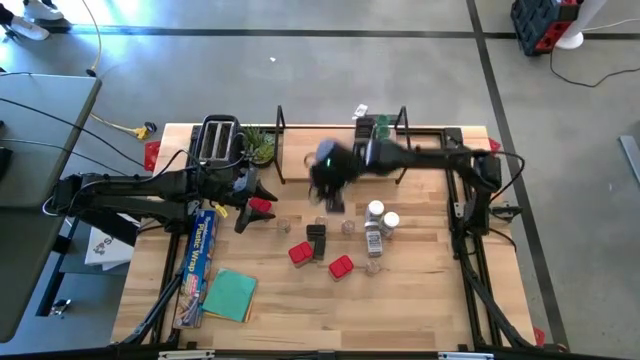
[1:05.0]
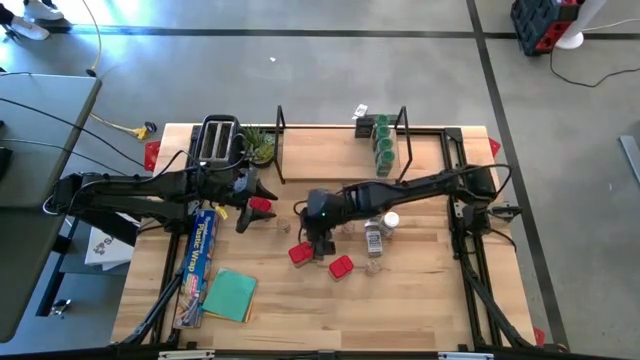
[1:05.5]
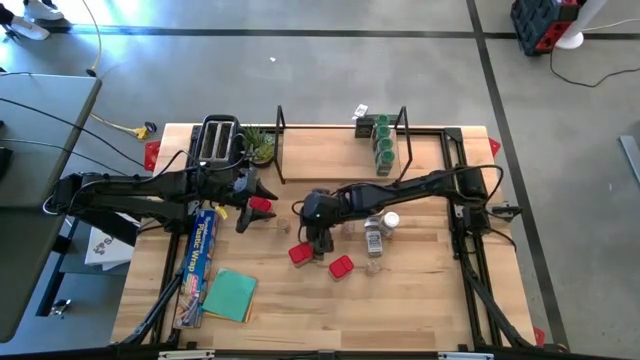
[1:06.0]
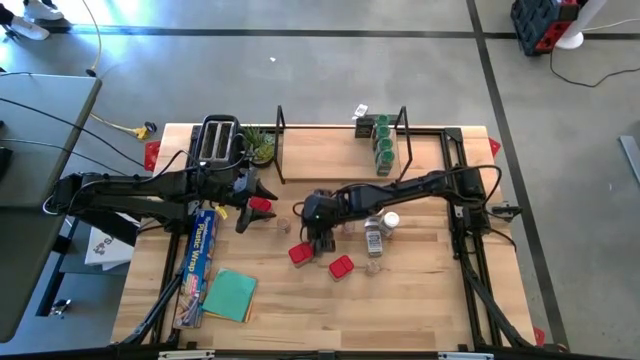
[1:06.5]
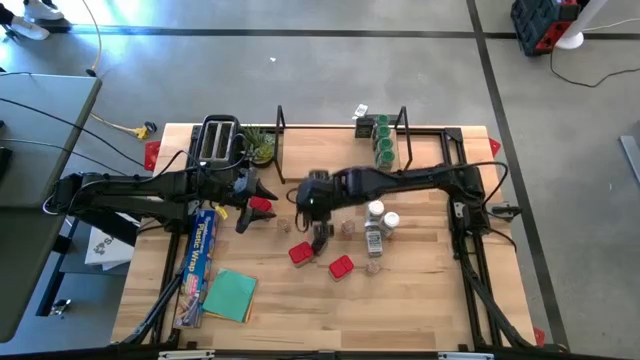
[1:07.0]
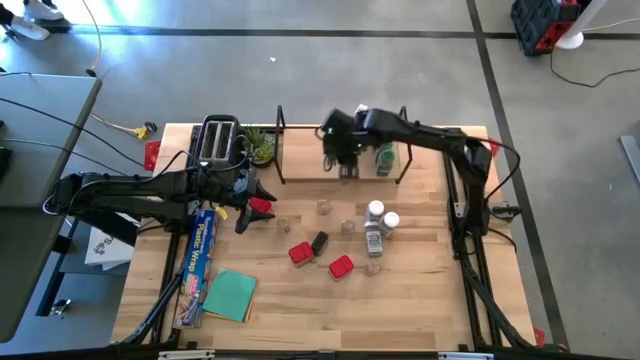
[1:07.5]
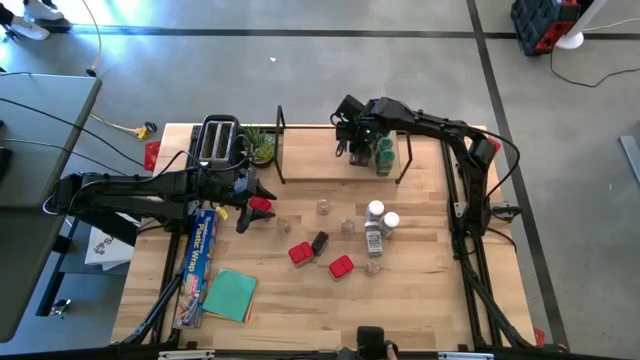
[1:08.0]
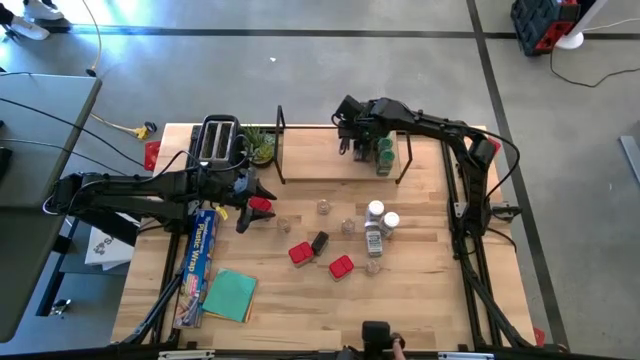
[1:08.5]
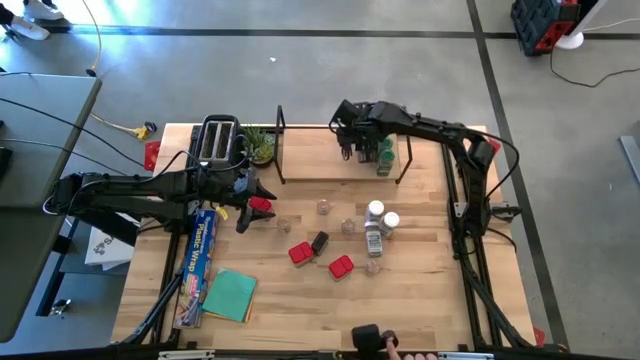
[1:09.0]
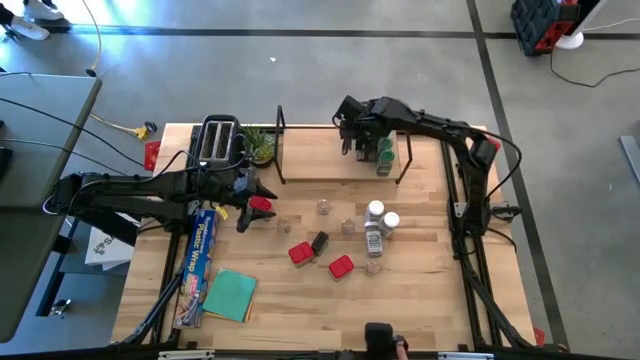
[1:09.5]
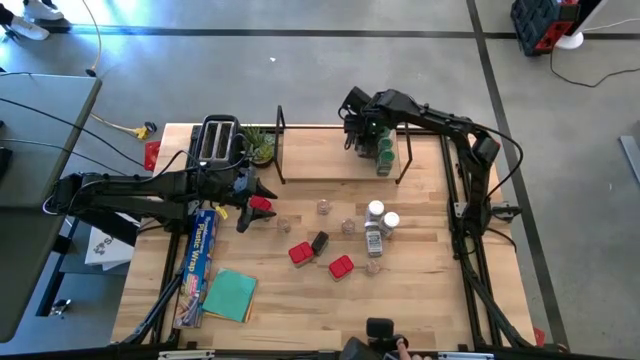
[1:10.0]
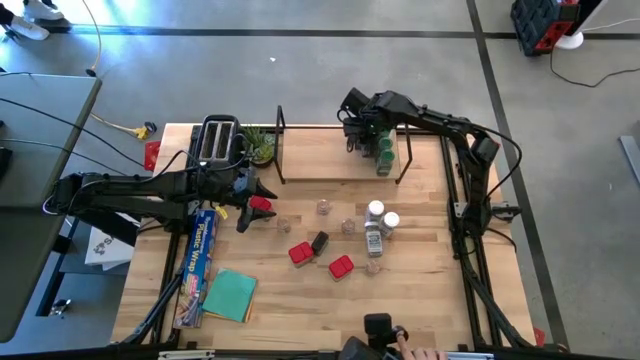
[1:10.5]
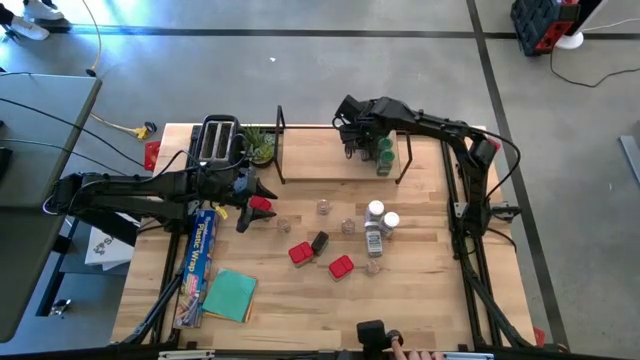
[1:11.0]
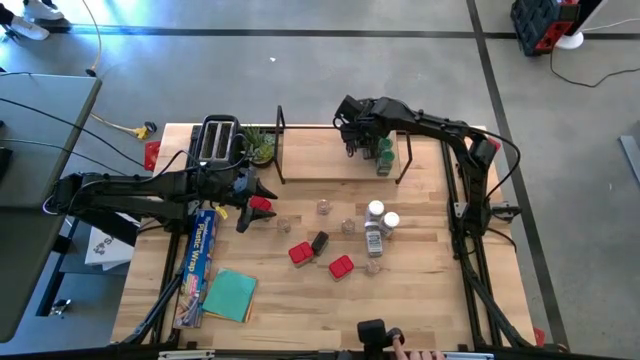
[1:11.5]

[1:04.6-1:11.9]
Task: Shelf spices
Put the top black seasoning can on the shelf aligned with the other black seasoning can

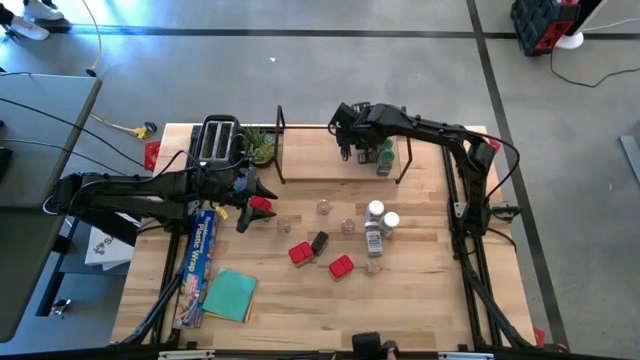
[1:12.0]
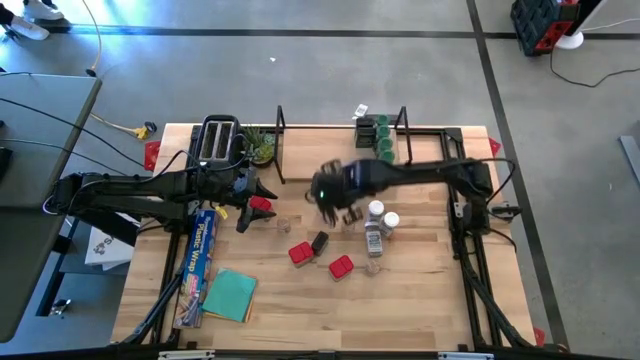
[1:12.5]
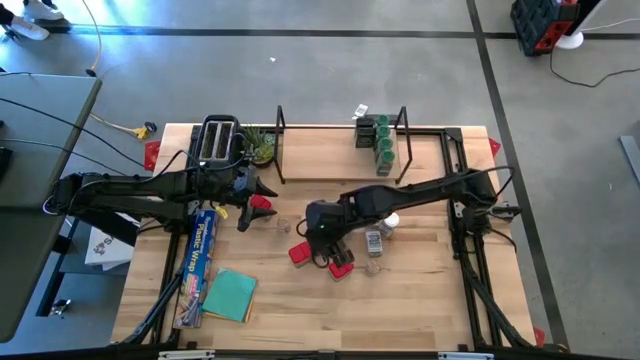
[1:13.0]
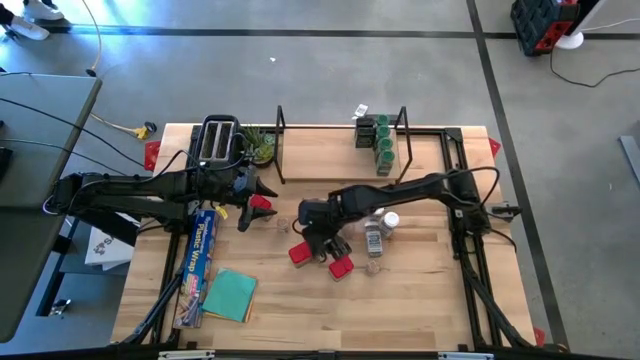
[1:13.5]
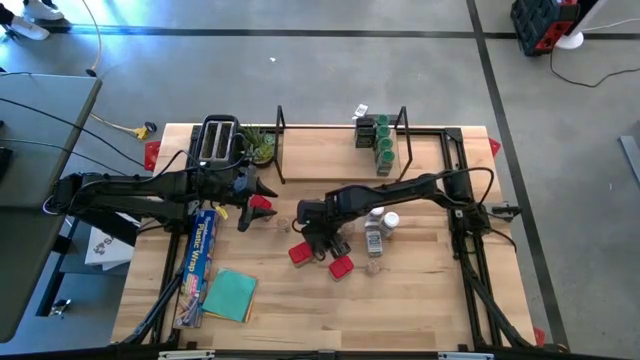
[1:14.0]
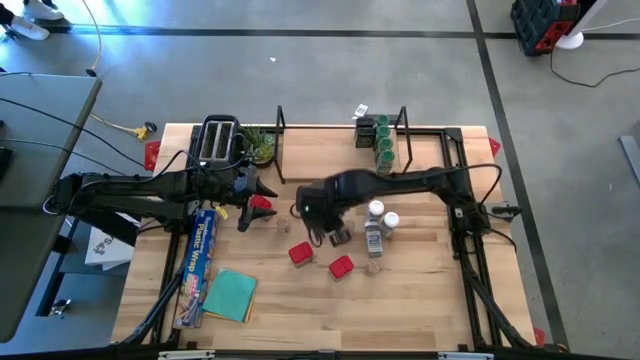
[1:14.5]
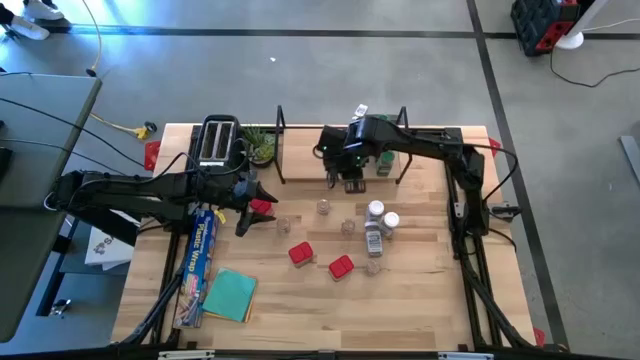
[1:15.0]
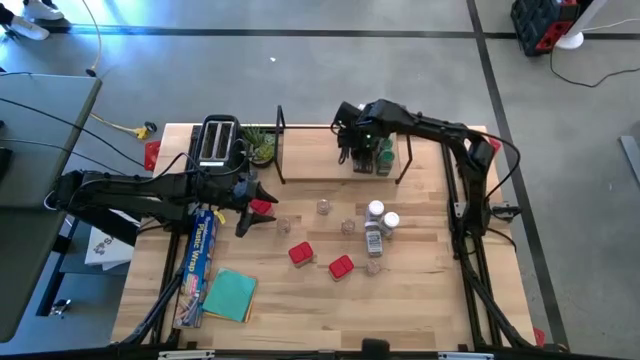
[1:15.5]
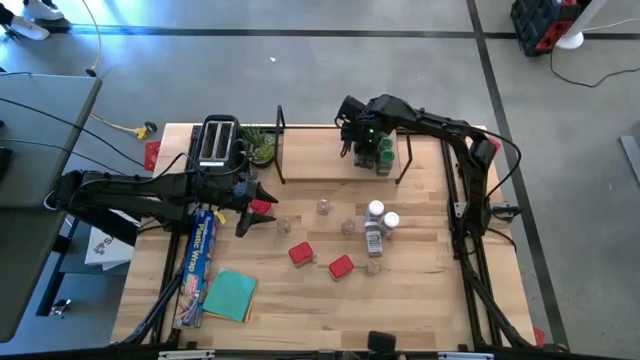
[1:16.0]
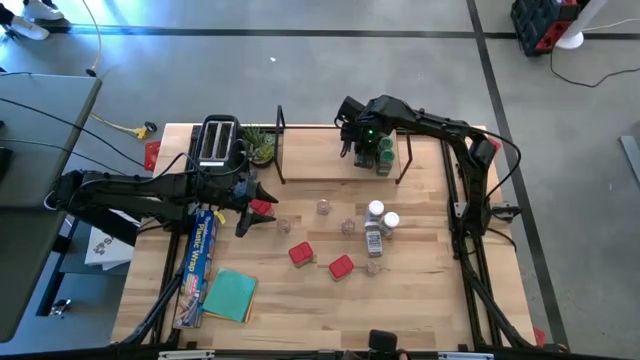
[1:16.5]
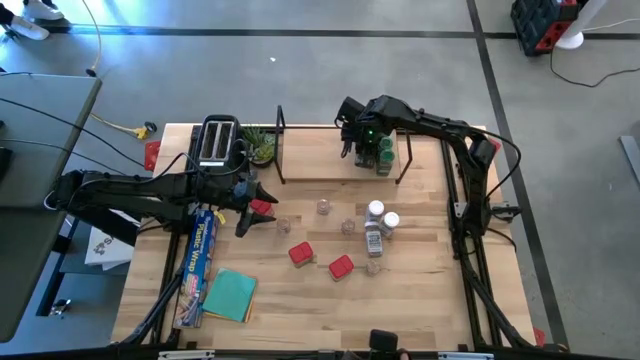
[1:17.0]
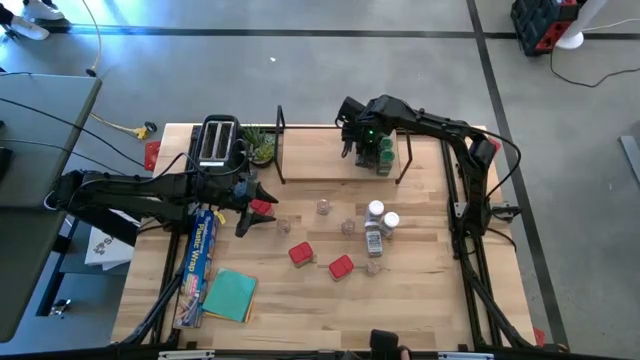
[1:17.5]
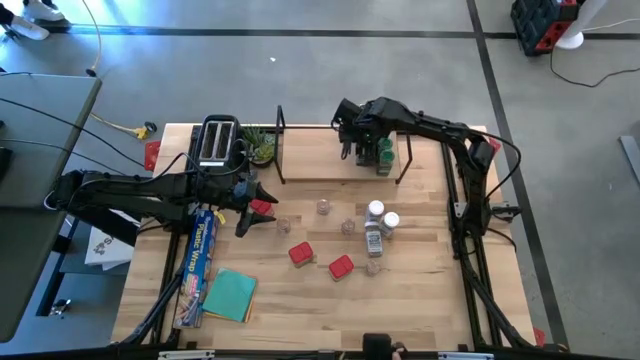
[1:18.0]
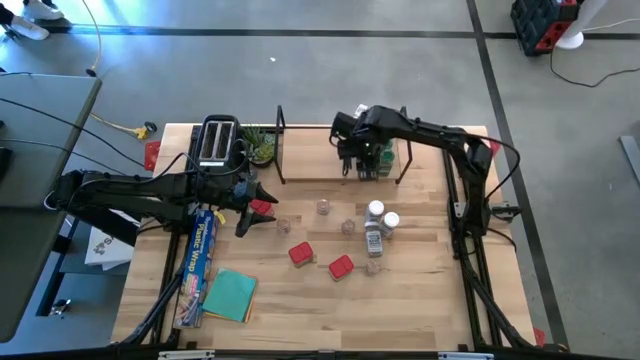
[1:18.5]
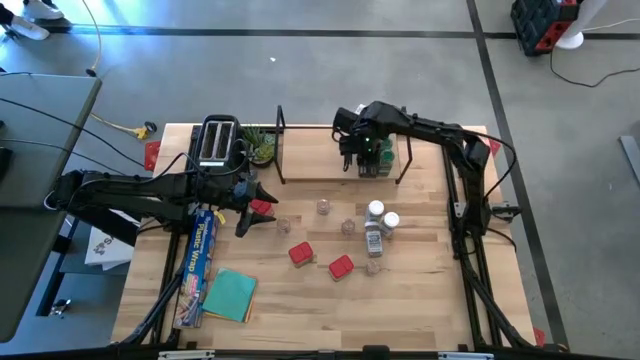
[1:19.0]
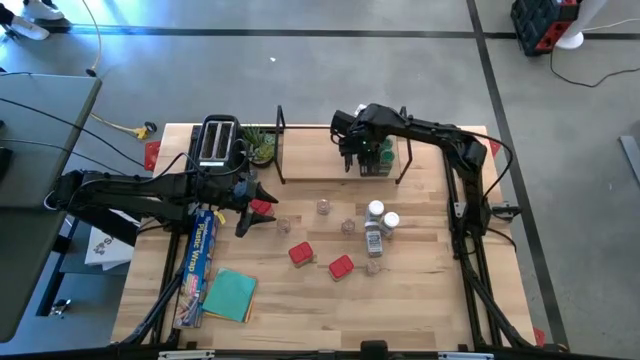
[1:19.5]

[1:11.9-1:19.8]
Put the black seasoning can on the shelf aligned with the other black seasoning cans

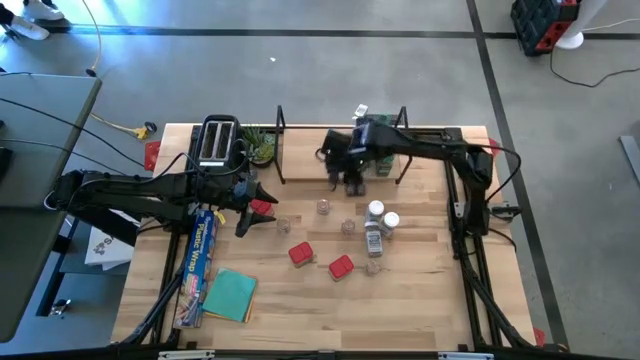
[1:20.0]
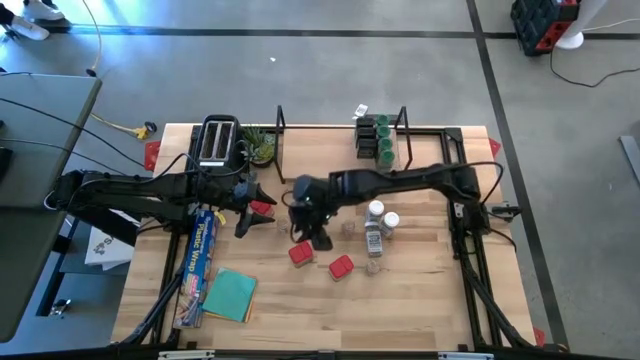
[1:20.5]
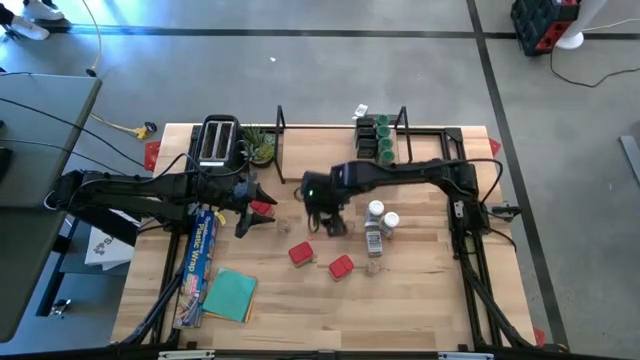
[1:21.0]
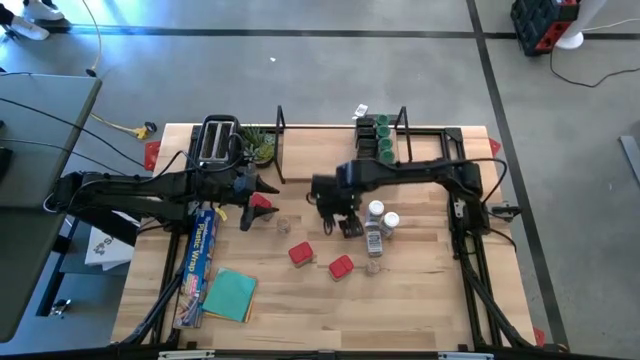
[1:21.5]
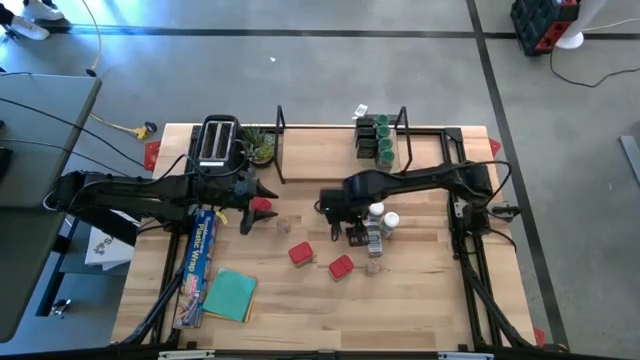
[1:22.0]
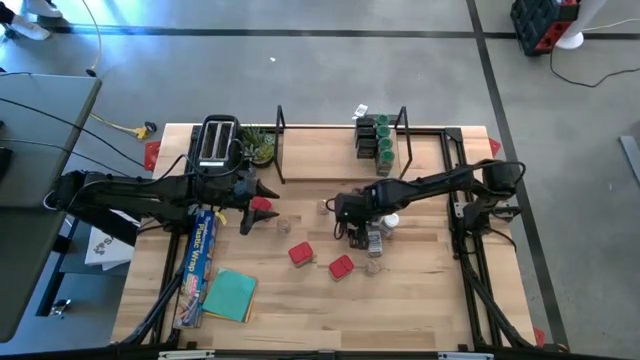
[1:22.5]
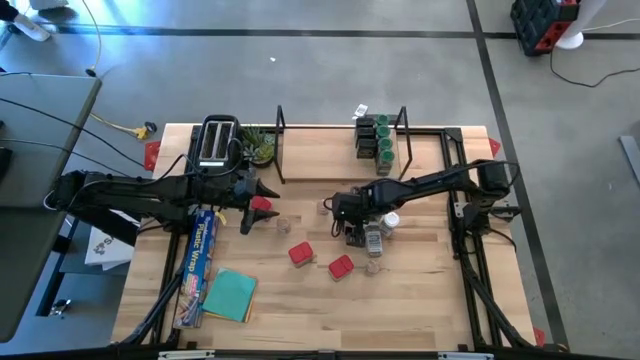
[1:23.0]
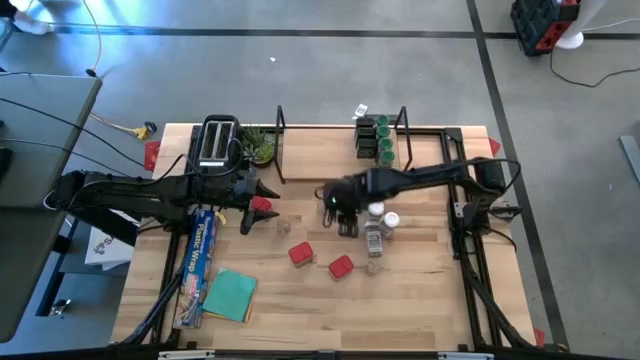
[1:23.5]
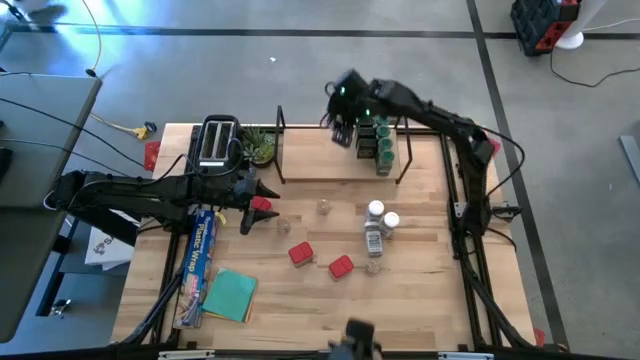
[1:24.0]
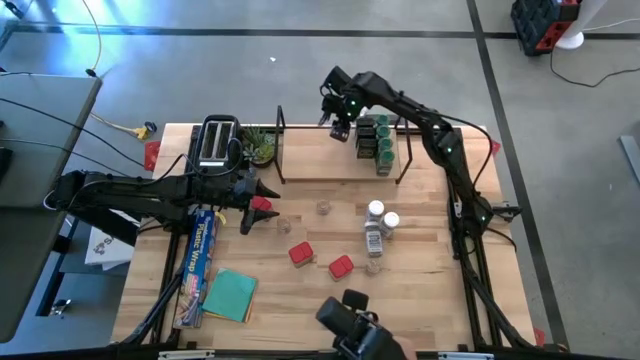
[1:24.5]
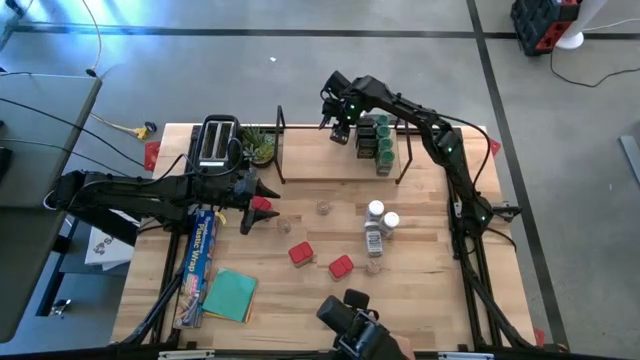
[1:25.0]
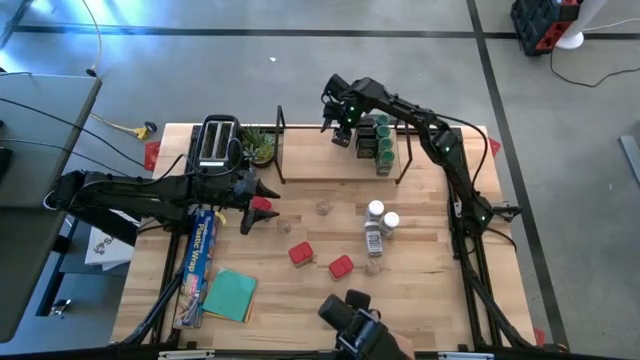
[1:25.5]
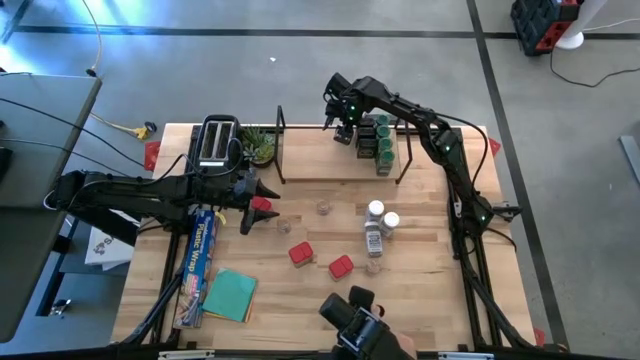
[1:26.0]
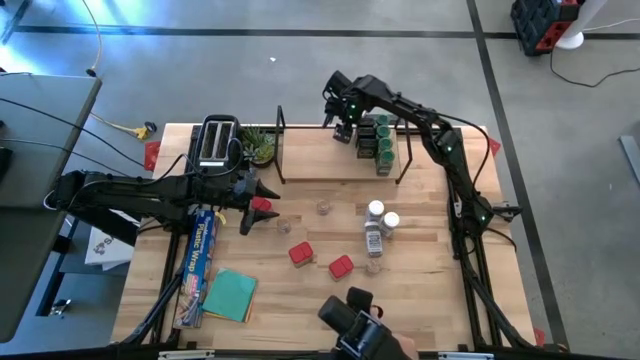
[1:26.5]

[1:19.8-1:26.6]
Put the right brown seasoning bottle on the shelf
